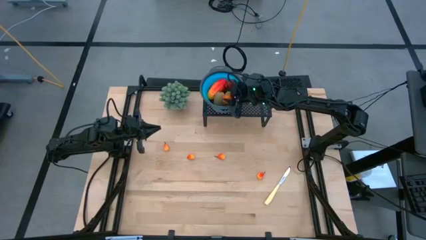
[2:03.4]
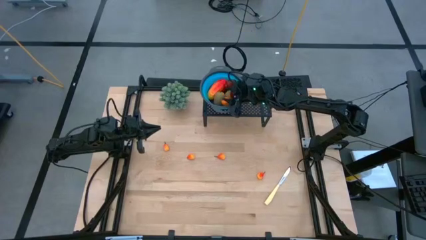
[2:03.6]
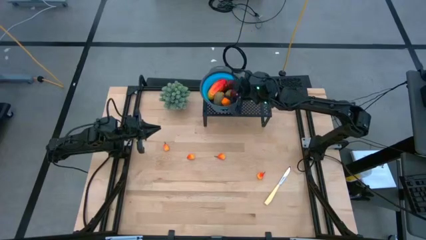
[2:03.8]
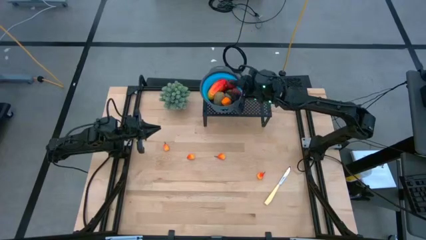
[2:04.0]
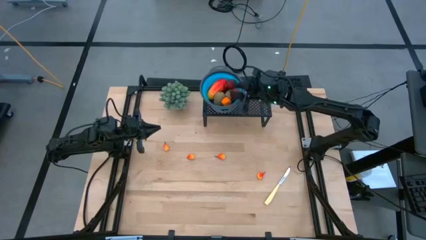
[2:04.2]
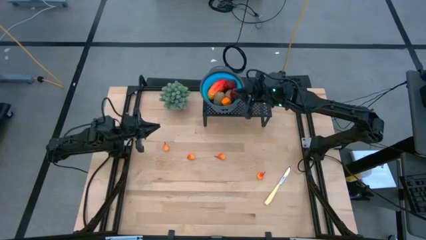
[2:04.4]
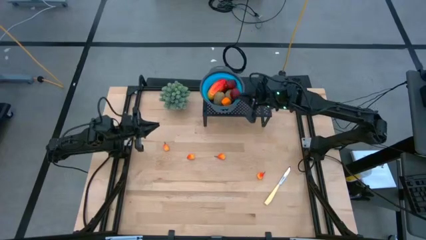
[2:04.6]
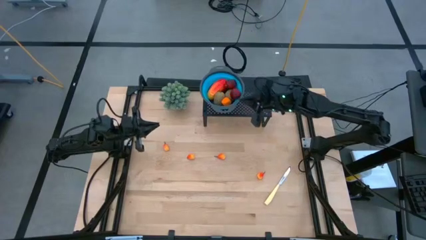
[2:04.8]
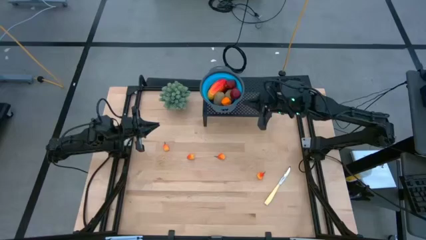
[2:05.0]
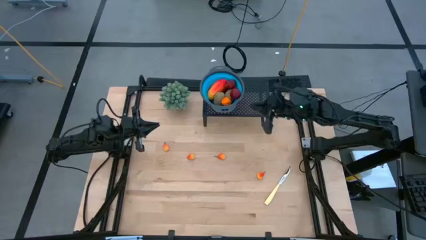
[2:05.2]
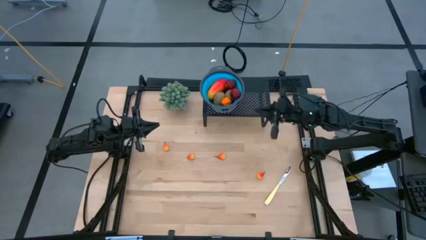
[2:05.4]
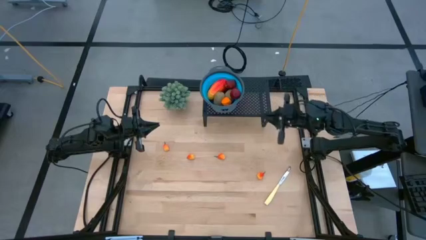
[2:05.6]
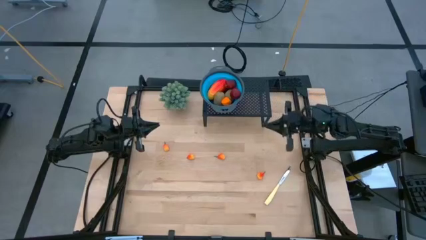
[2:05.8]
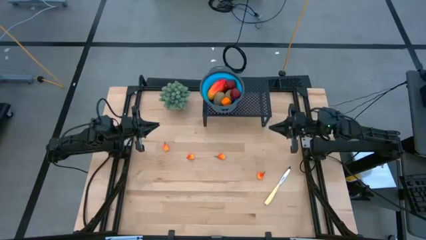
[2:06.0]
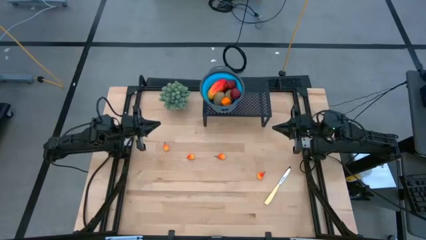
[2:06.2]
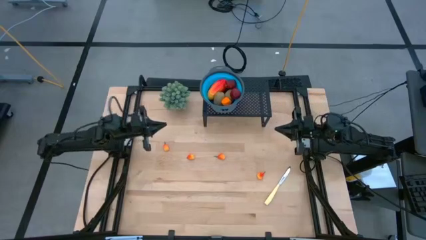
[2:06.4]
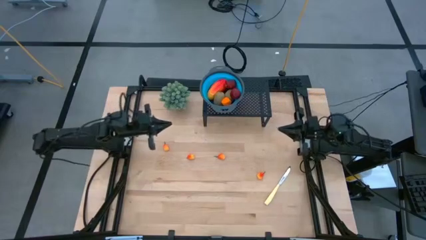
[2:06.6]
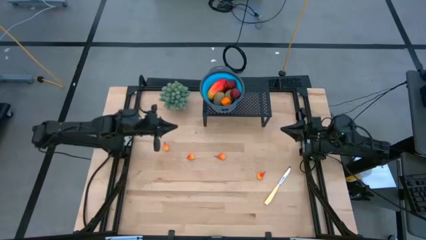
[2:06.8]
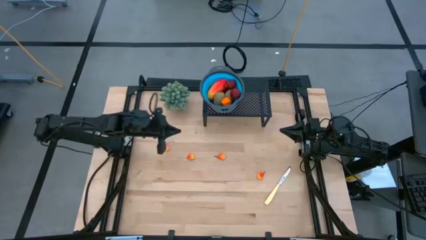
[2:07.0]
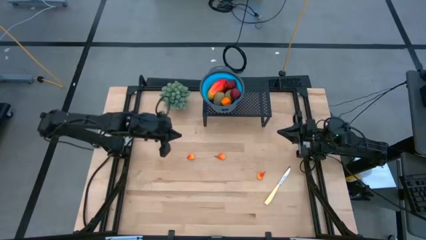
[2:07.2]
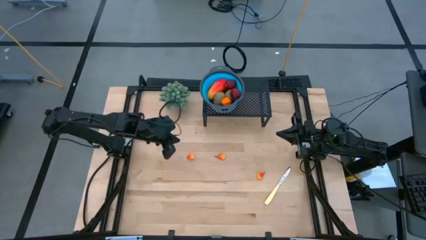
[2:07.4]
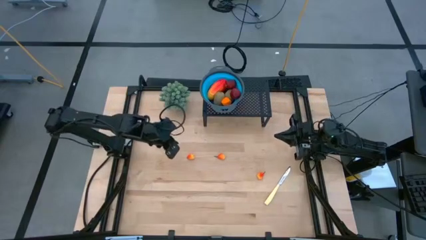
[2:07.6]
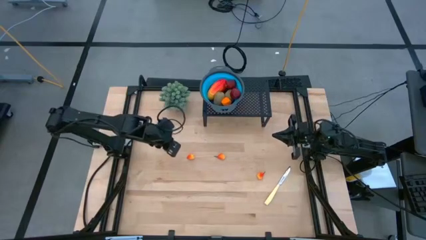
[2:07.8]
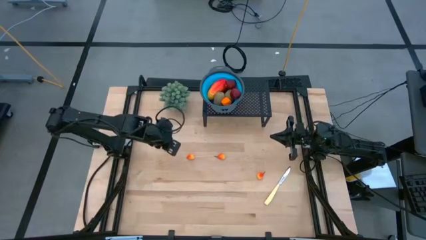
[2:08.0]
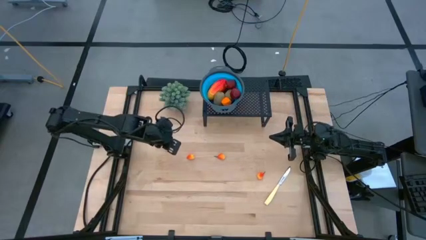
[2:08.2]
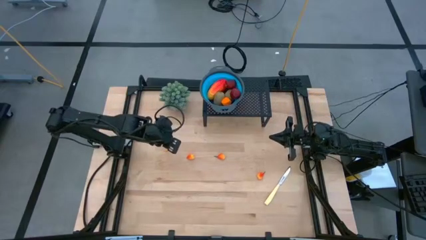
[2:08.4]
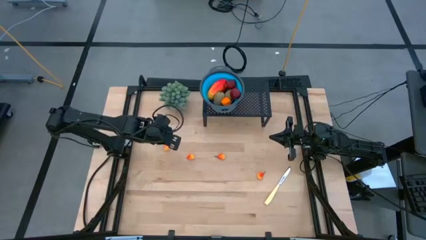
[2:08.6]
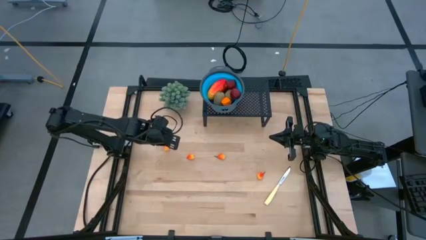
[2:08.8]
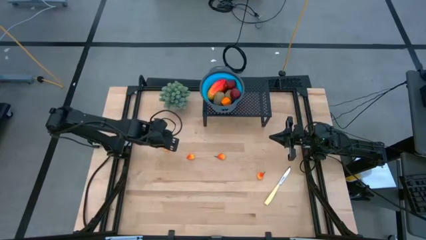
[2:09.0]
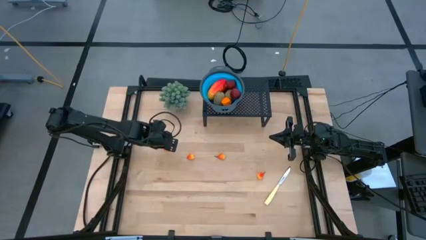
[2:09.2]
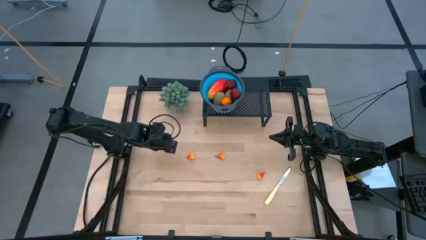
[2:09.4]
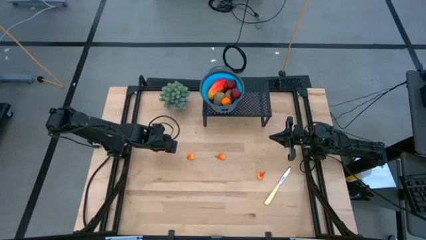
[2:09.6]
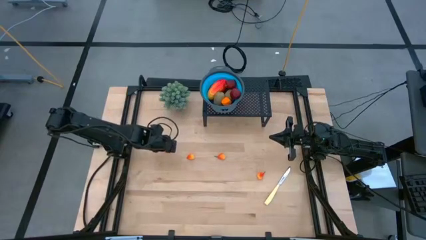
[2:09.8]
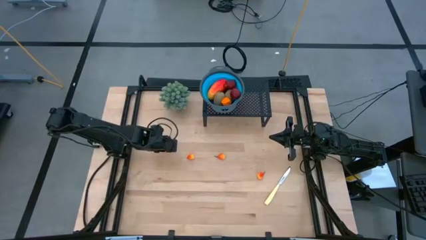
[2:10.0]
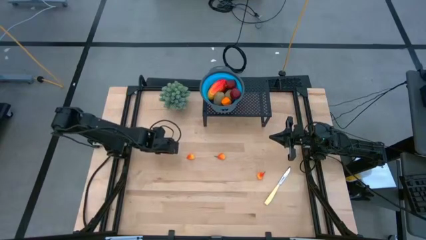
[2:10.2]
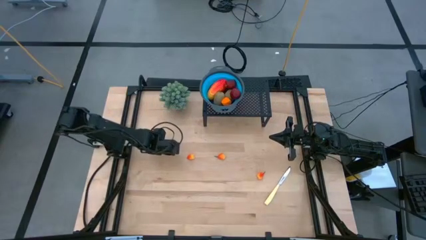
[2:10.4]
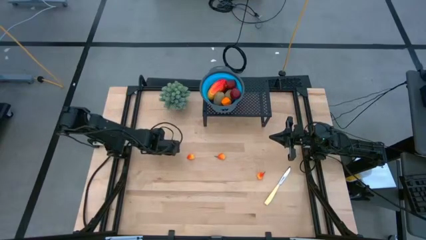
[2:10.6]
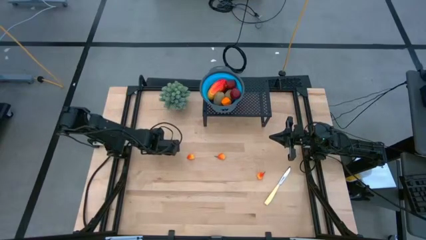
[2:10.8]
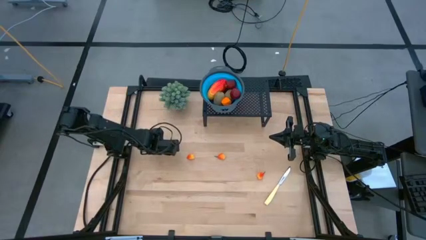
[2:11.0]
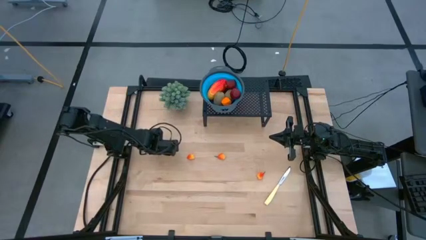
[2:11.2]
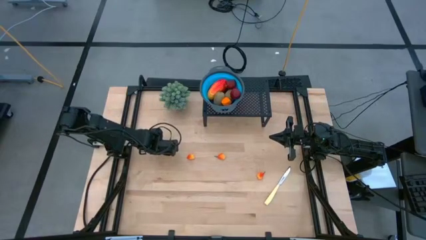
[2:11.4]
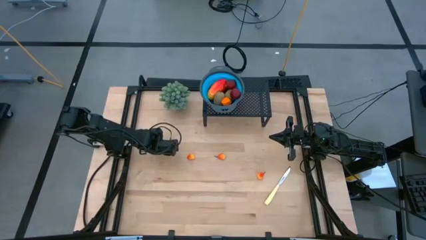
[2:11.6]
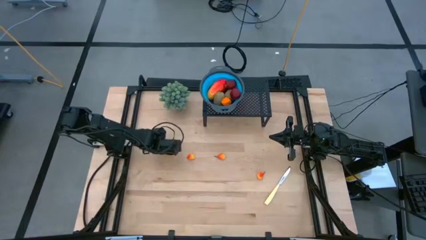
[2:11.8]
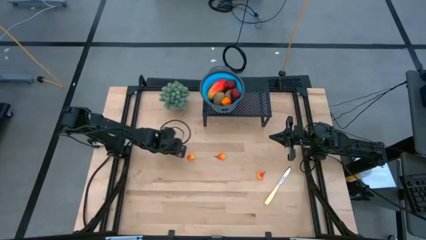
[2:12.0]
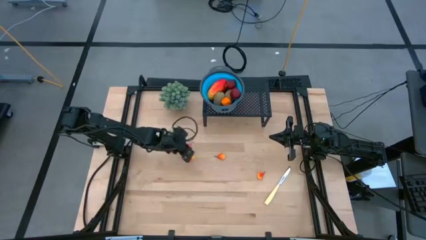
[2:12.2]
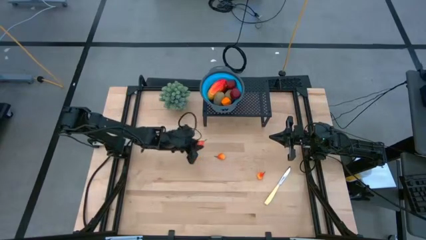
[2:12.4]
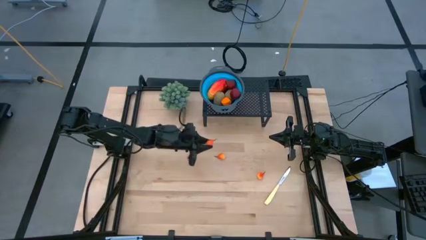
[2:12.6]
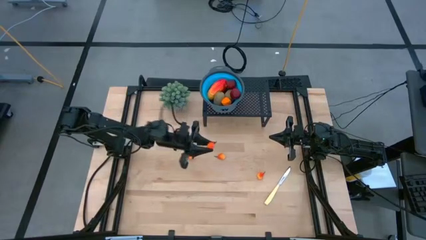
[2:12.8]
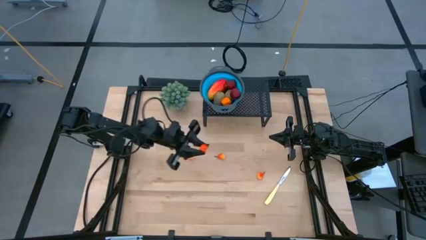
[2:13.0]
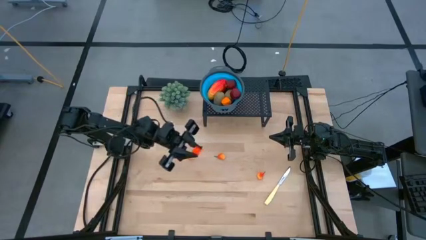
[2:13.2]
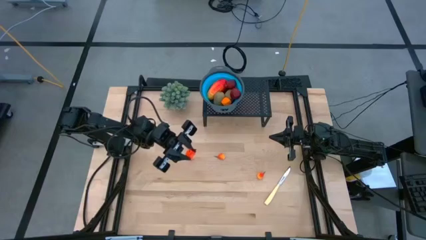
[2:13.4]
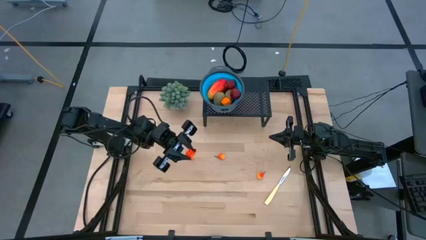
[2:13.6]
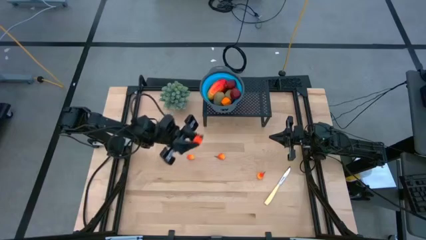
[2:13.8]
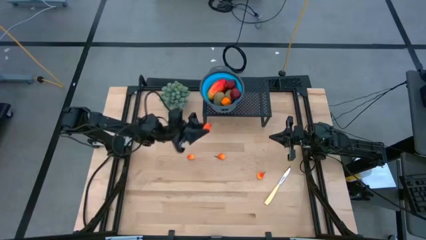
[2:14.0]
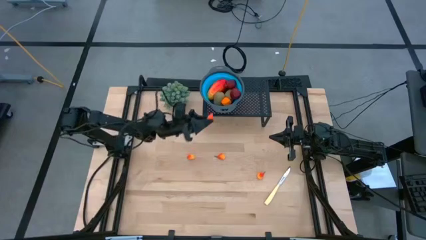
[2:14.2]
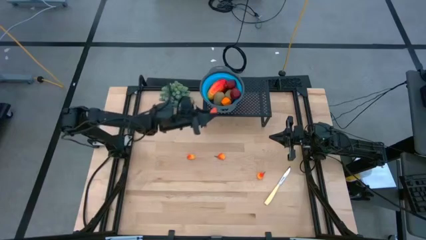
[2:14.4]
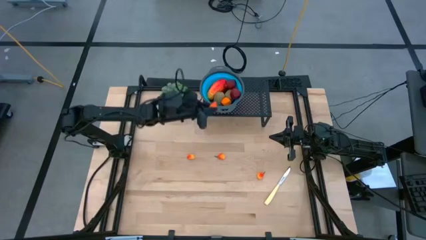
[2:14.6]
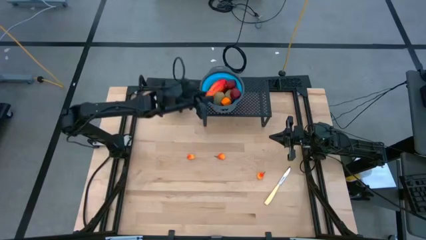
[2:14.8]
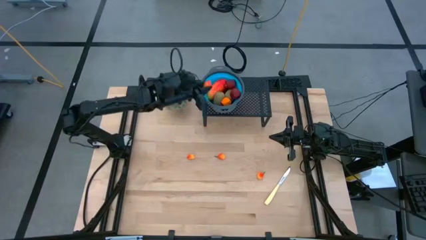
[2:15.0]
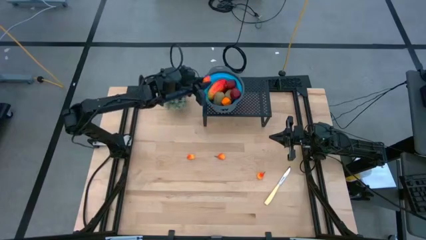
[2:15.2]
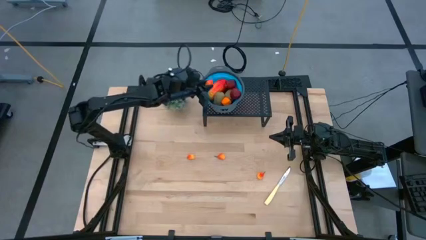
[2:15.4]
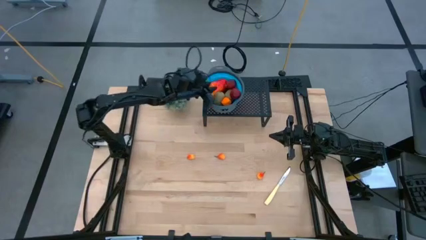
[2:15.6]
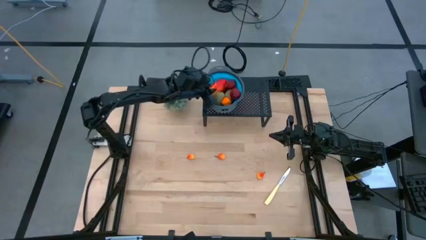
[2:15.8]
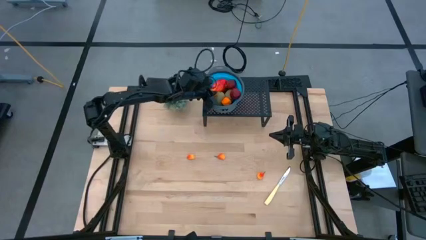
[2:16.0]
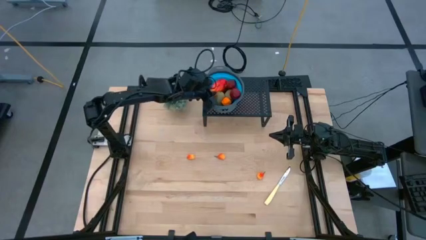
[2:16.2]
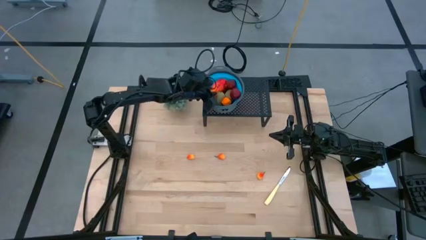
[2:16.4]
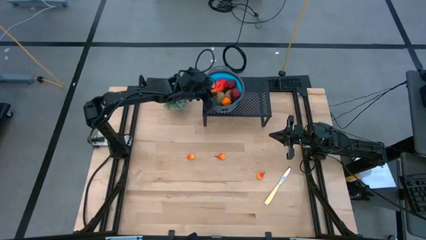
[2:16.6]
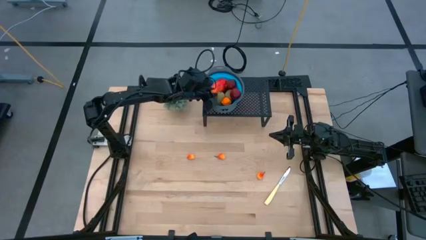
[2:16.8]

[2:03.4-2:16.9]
Task: Pick & Place Fruit
Put the orange peach into the blue strainer bowl on the shelf
